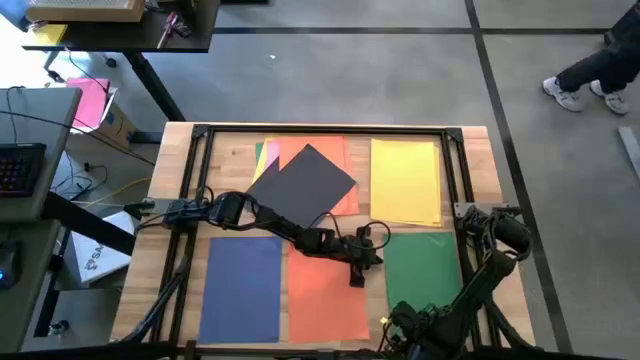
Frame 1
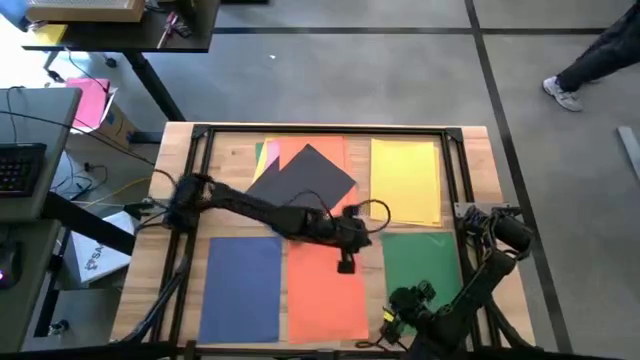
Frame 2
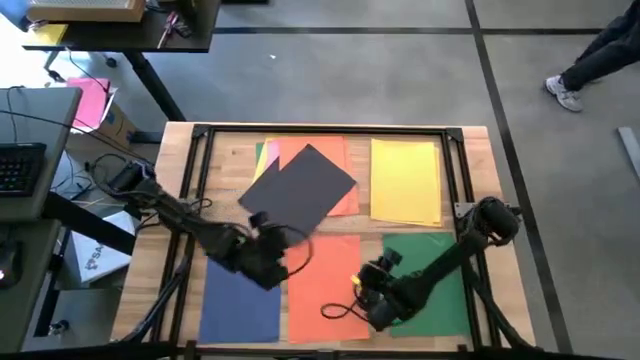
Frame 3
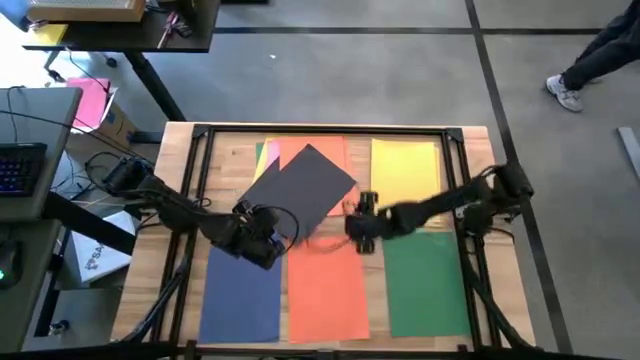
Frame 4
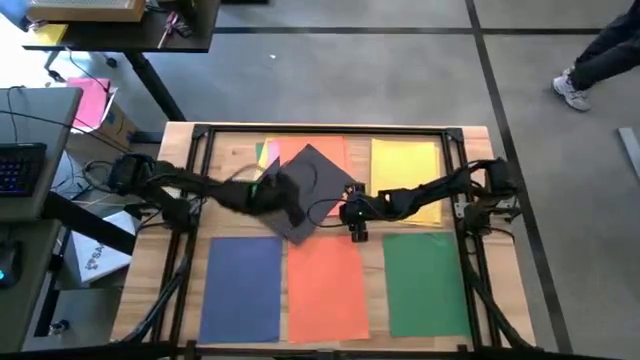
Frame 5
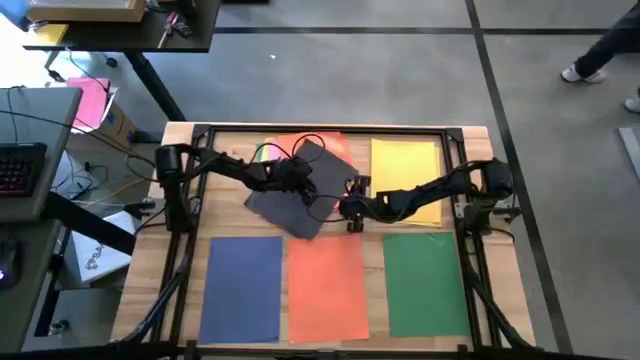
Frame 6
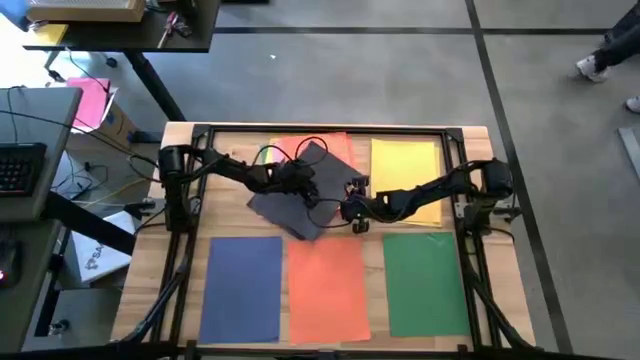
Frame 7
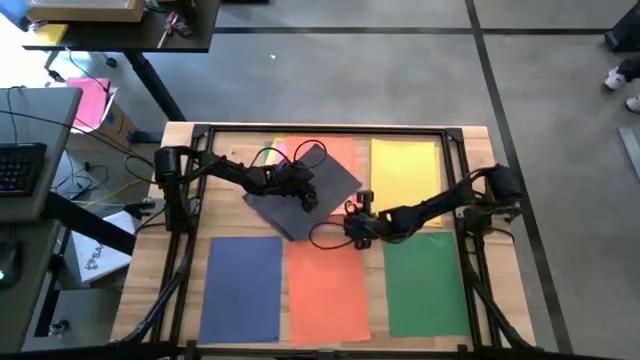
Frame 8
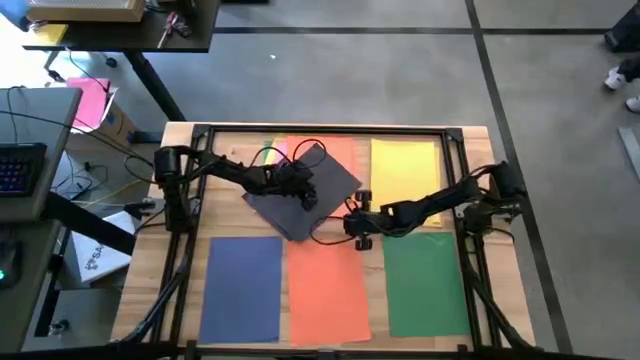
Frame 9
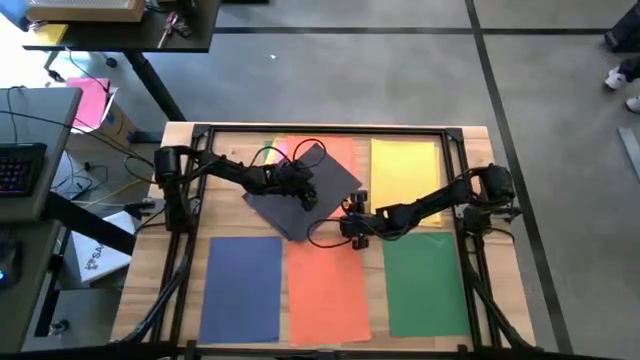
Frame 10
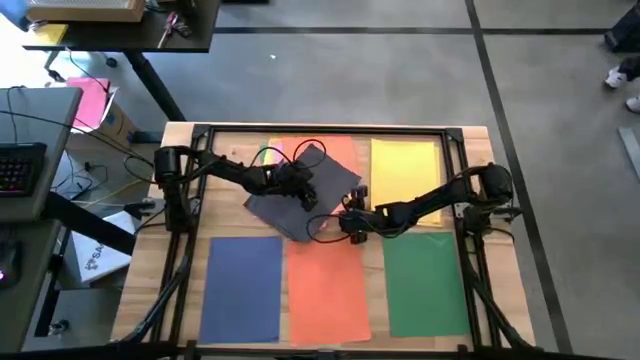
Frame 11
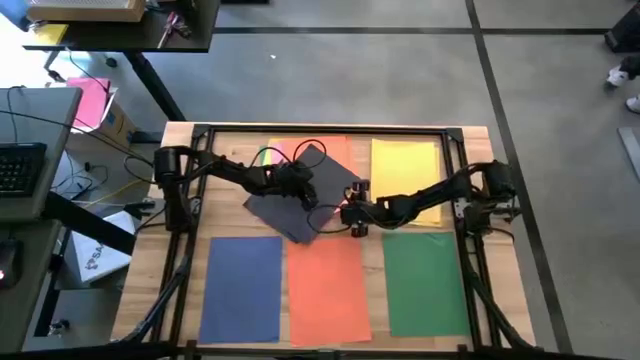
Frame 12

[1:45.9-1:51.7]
Task: Organize paper
Stack the orange paper on top of the orange paper

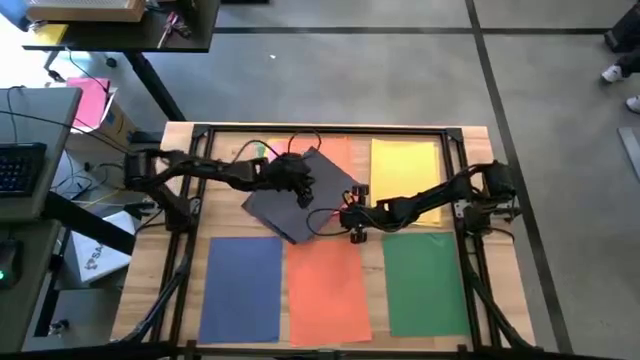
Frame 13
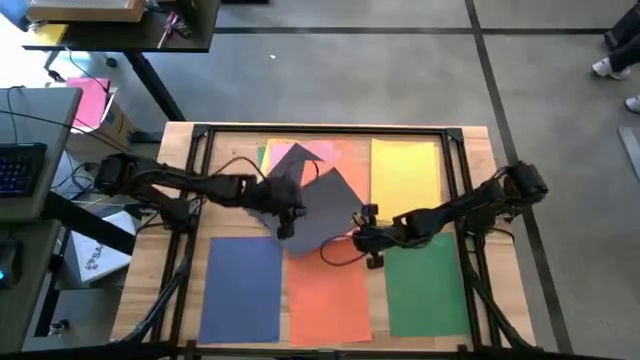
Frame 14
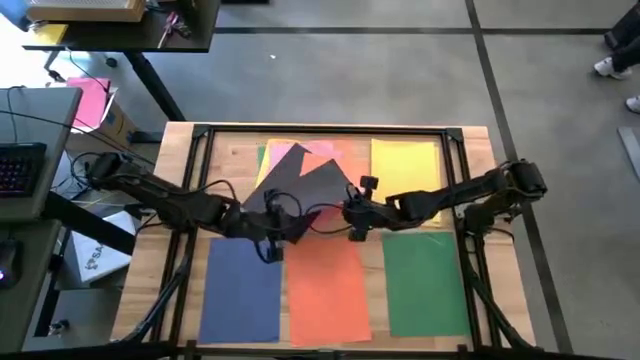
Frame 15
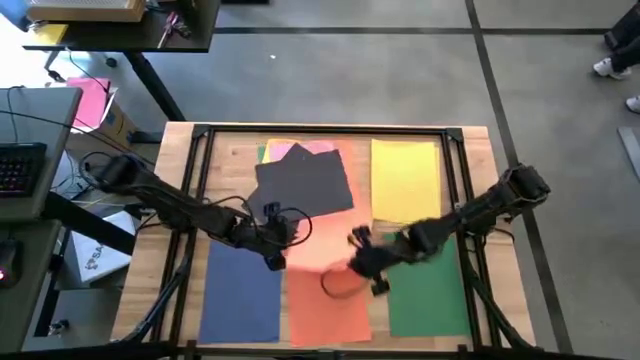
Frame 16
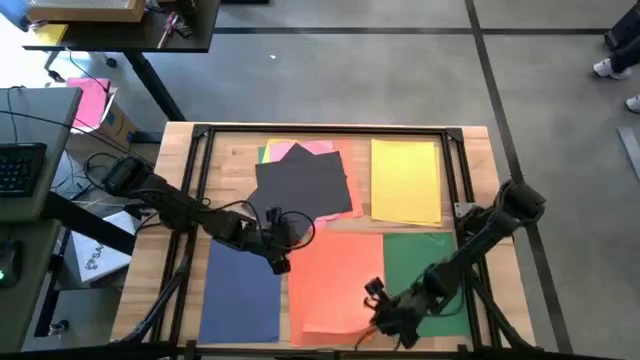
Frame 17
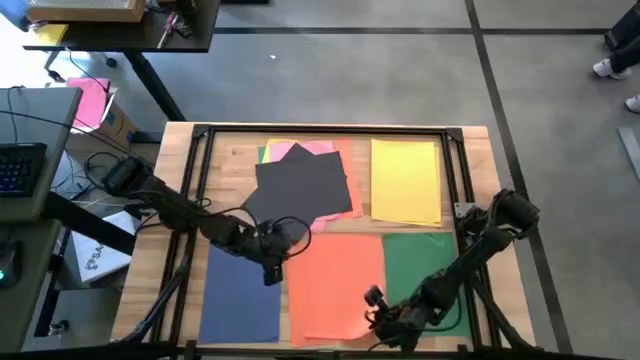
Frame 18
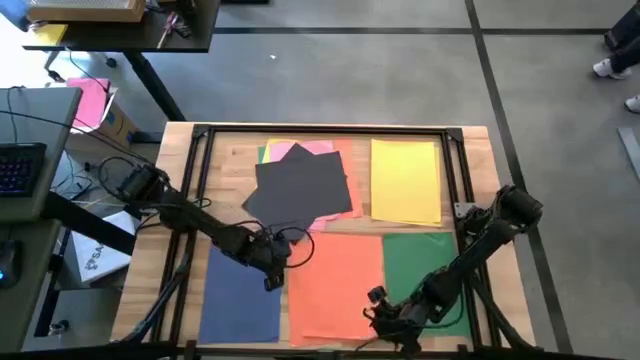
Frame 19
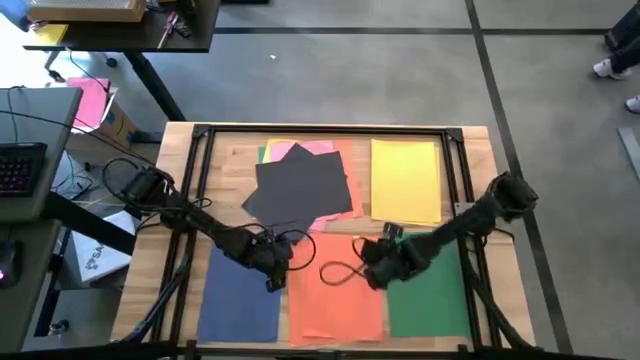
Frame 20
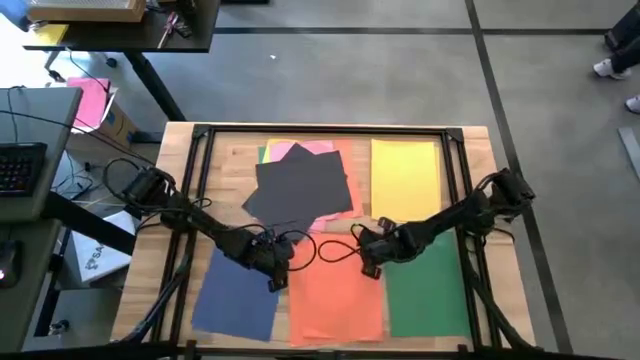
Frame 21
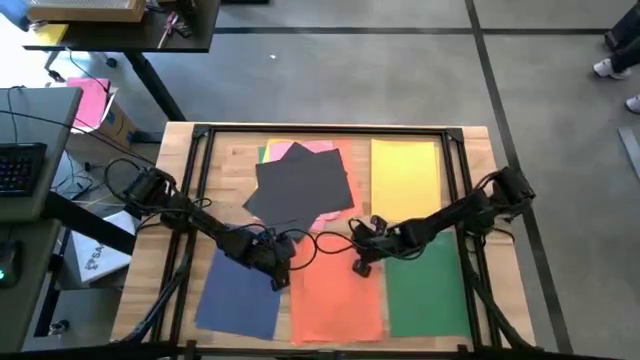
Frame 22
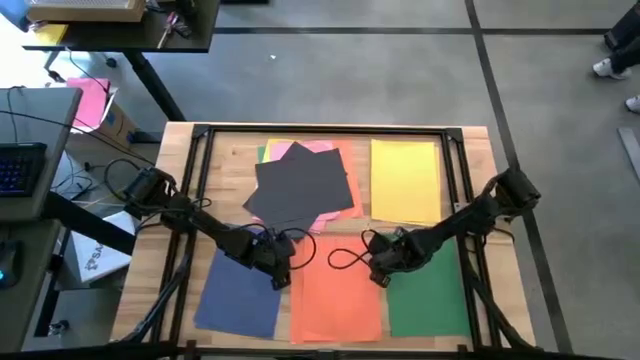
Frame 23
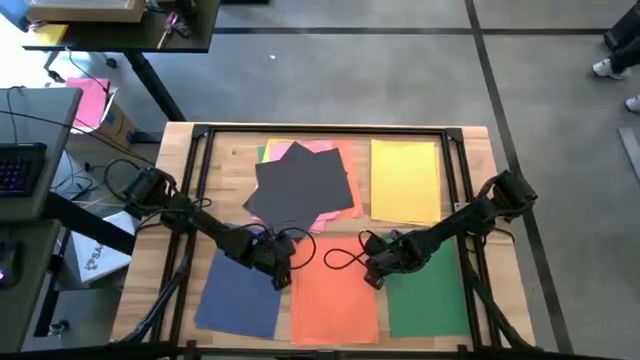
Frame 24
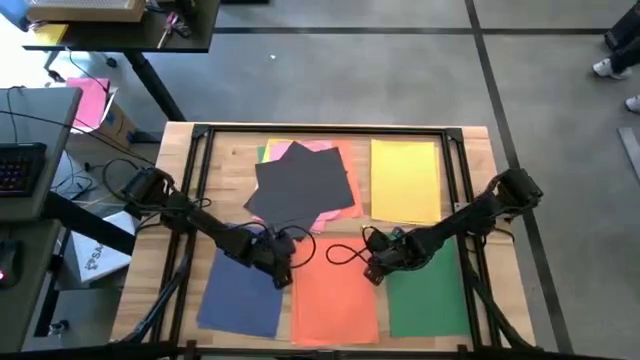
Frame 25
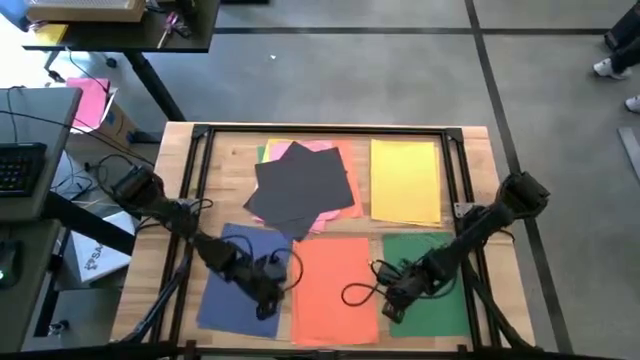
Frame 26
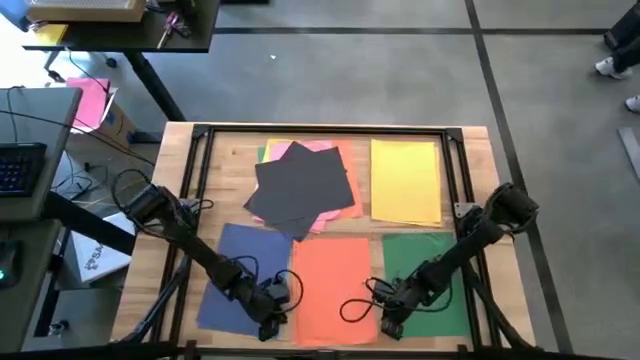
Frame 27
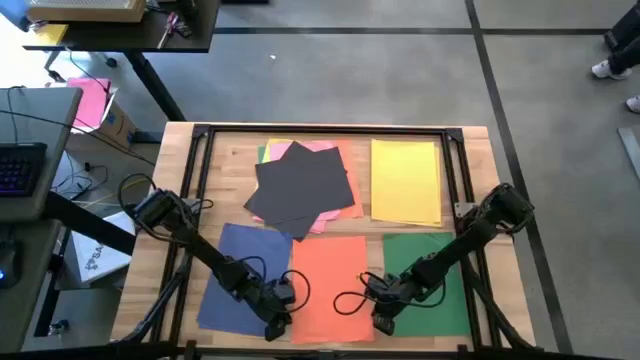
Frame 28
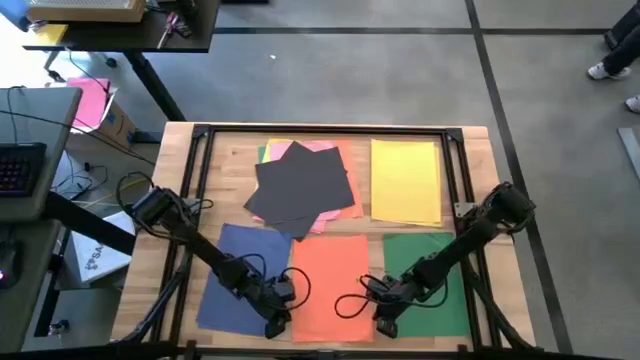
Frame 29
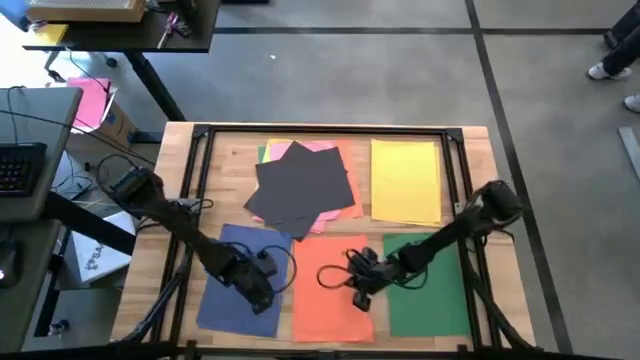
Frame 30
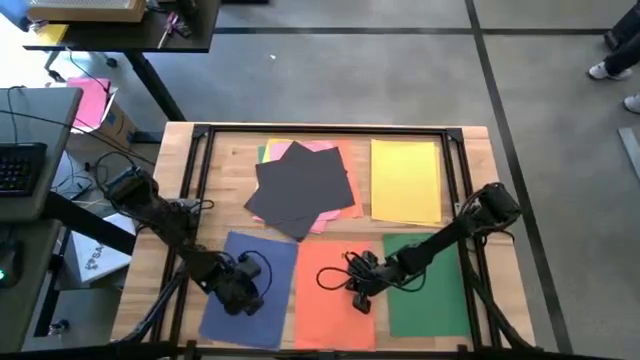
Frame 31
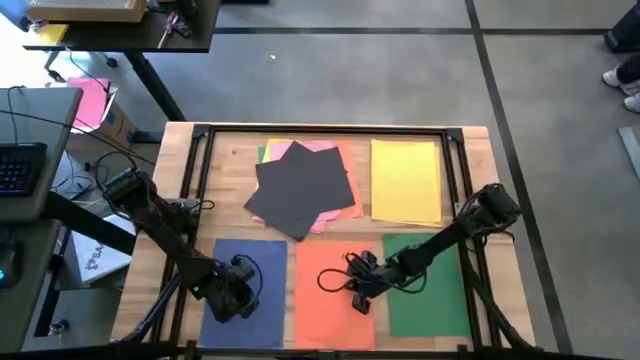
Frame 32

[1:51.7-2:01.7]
Stack the orange paper on top of the orange paper

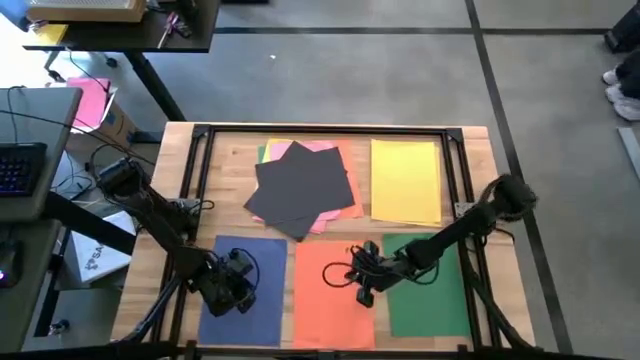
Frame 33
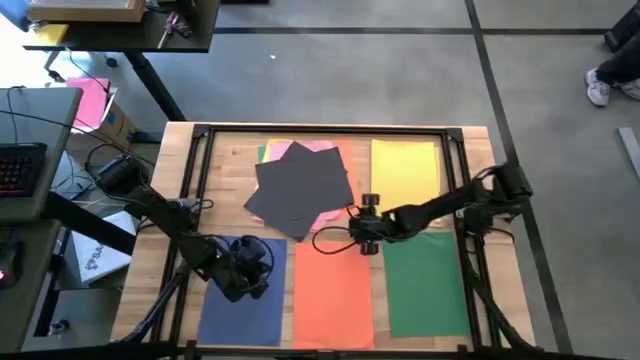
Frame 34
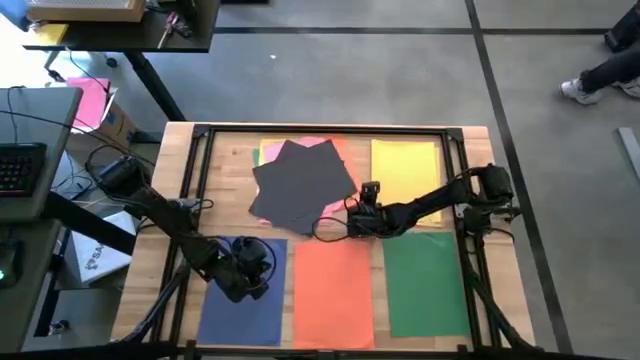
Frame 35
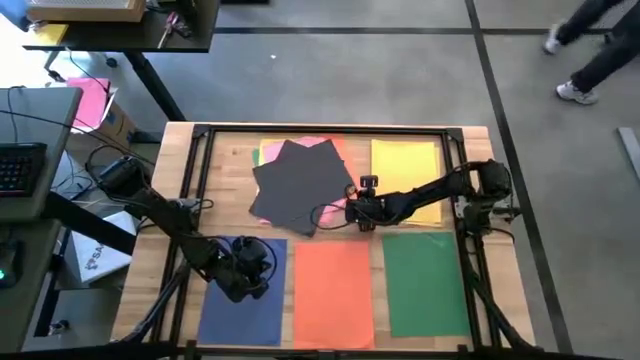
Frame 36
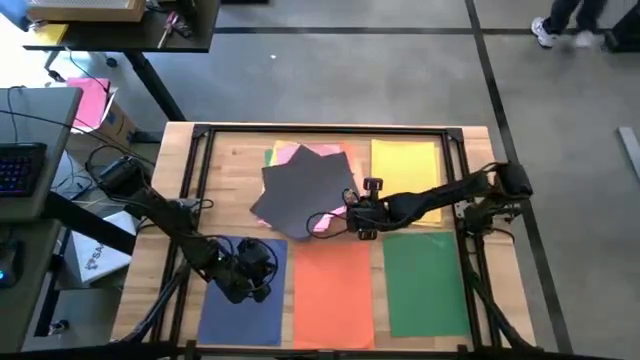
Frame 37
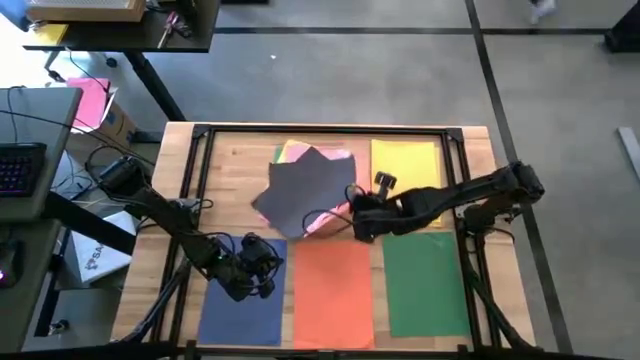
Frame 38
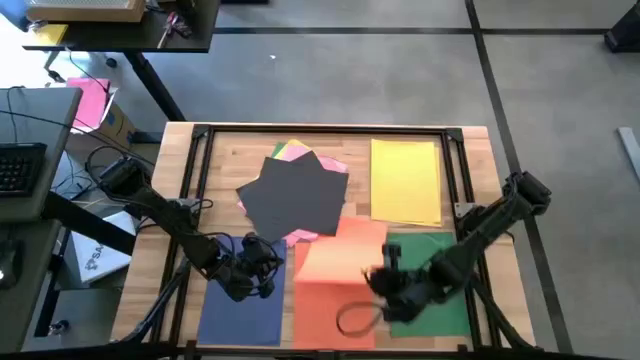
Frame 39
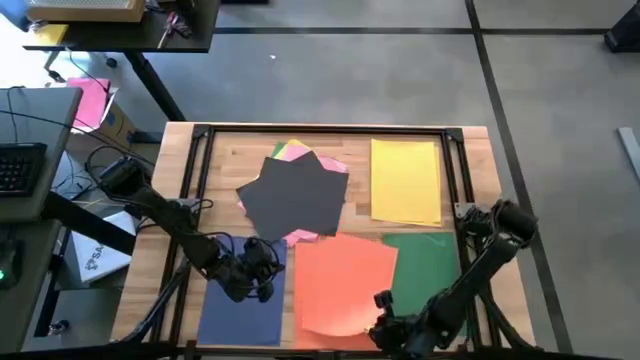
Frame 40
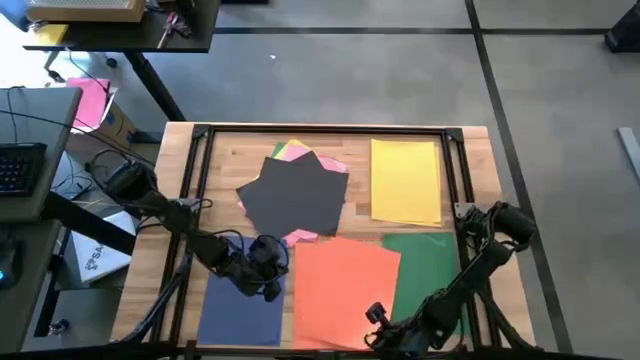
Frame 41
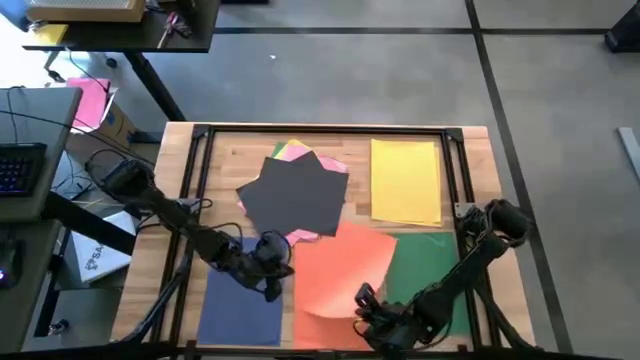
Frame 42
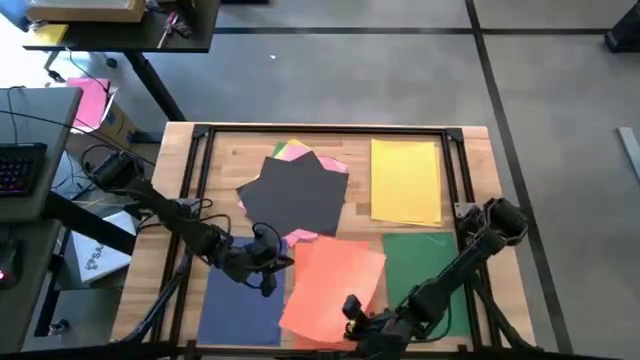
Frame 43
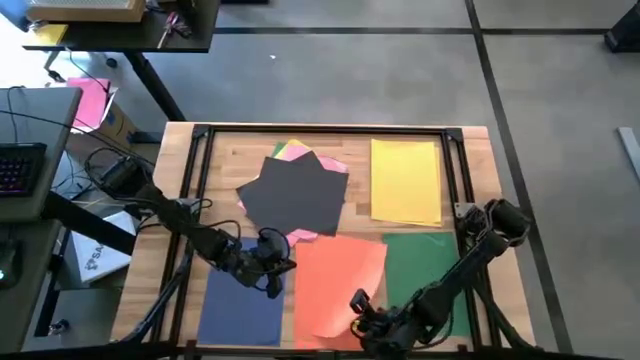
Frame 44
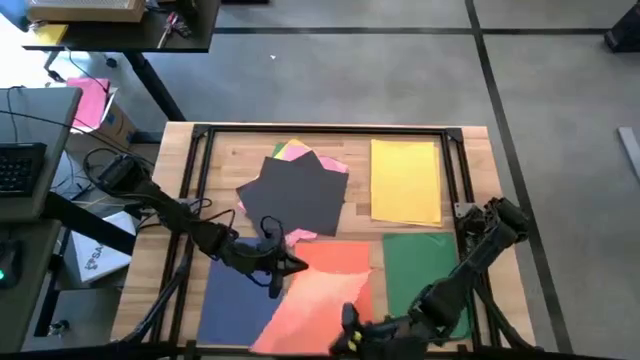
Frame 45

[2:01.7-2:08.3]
Stack the orange paper on top of the orange paper
